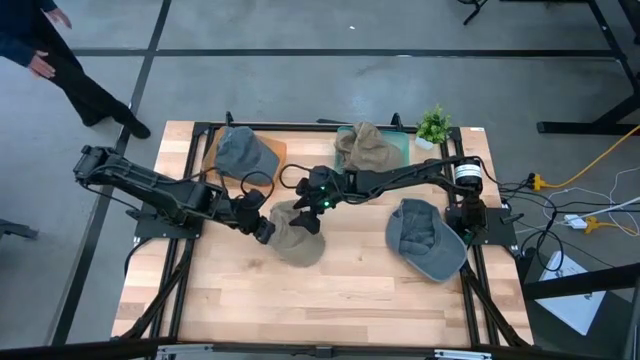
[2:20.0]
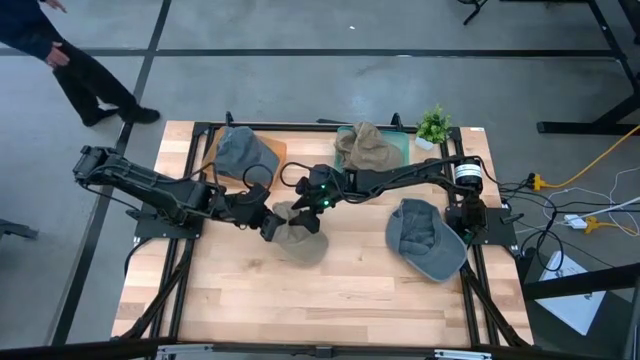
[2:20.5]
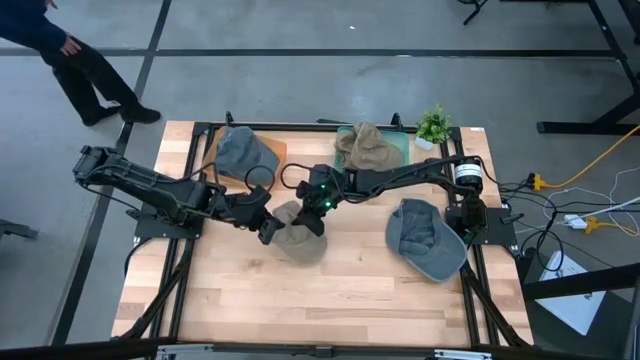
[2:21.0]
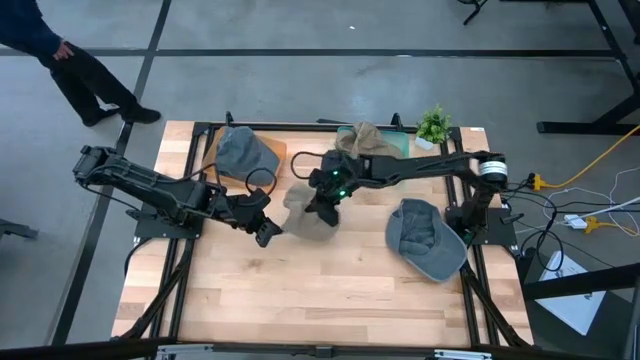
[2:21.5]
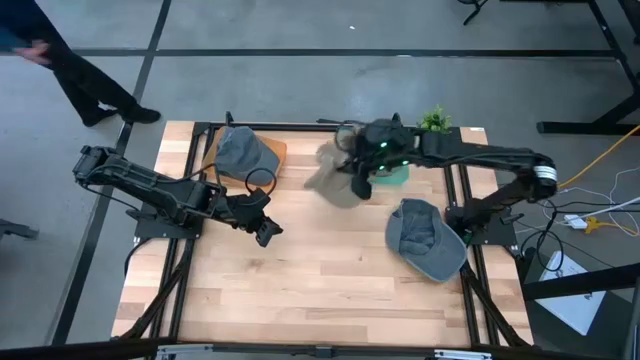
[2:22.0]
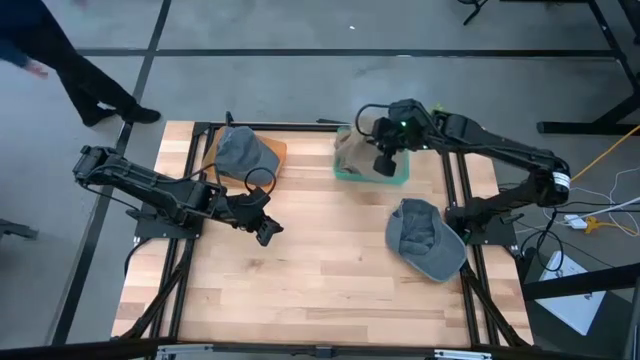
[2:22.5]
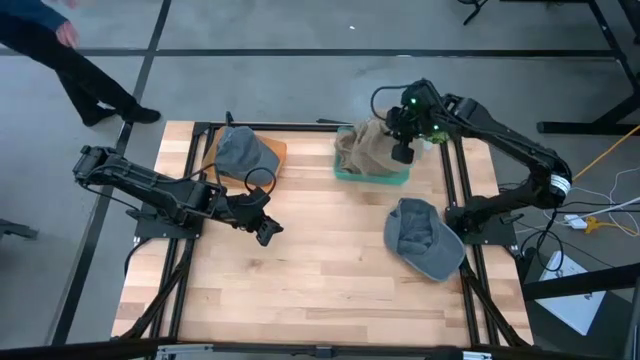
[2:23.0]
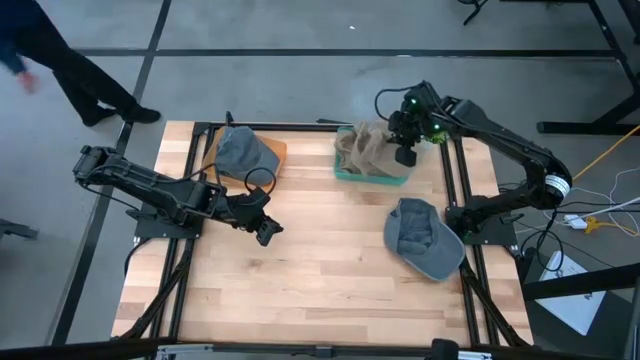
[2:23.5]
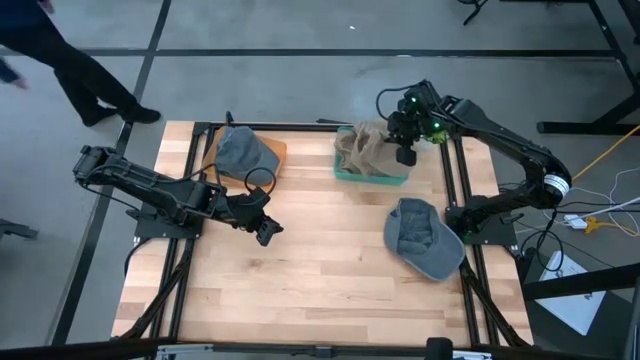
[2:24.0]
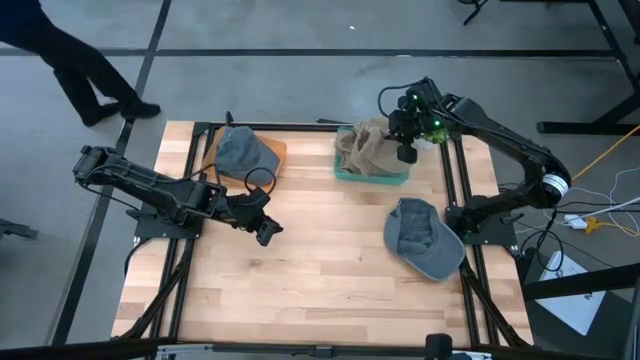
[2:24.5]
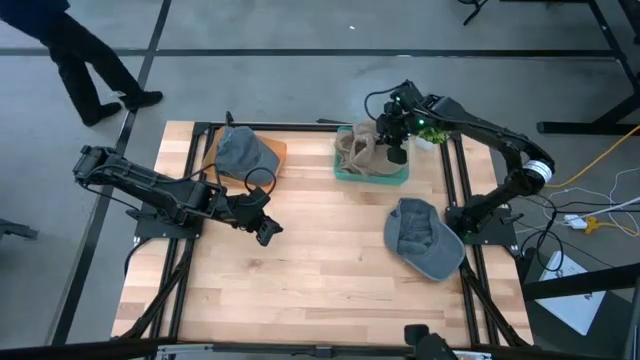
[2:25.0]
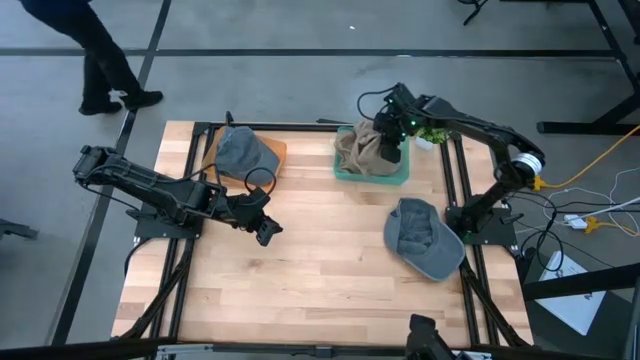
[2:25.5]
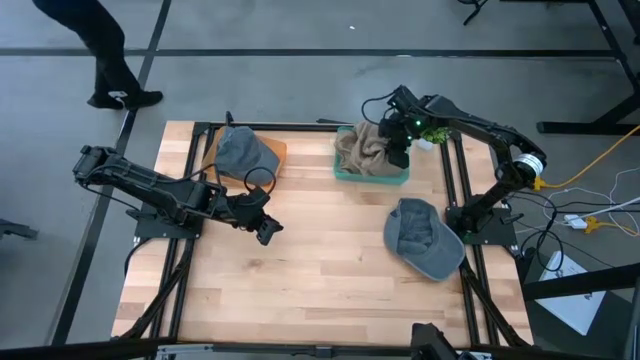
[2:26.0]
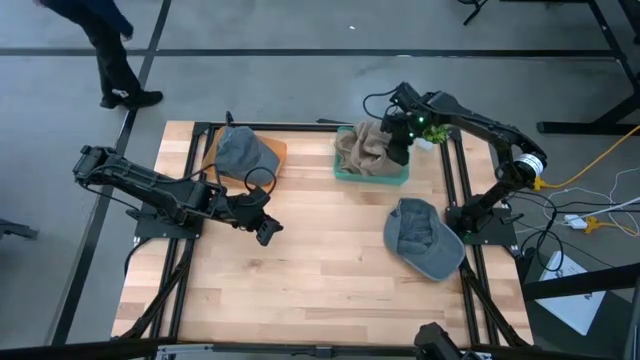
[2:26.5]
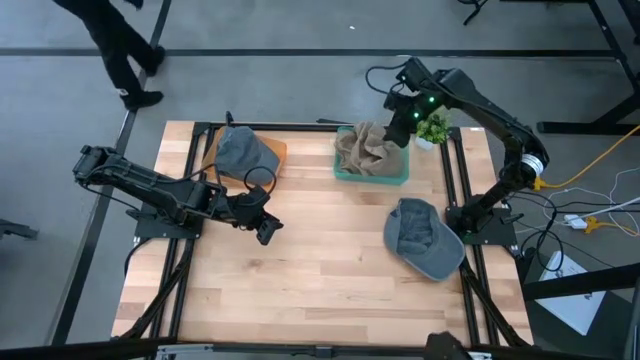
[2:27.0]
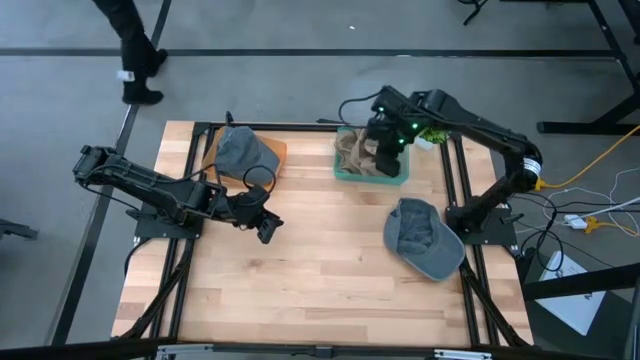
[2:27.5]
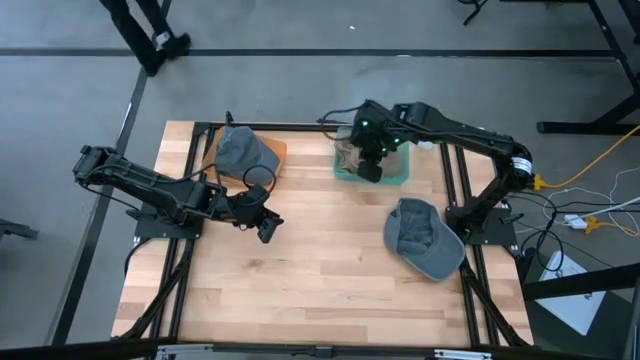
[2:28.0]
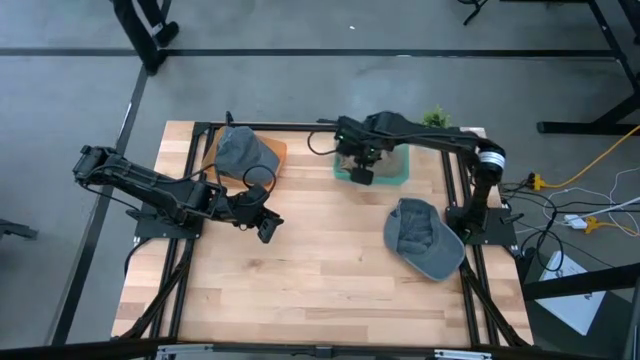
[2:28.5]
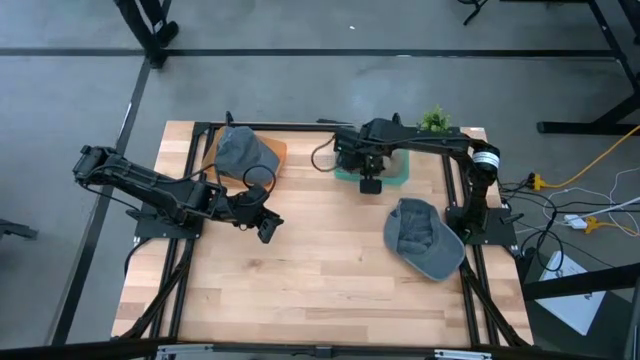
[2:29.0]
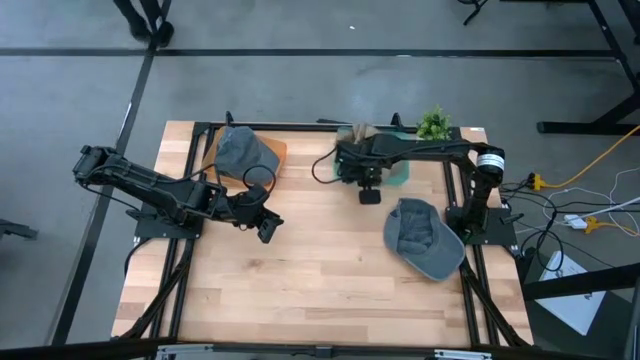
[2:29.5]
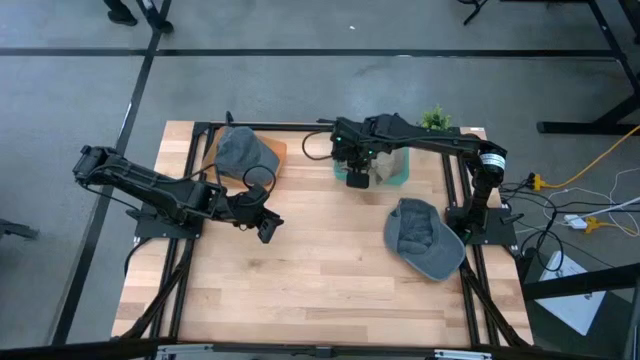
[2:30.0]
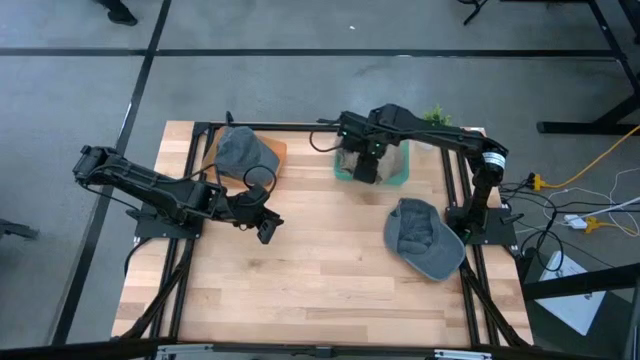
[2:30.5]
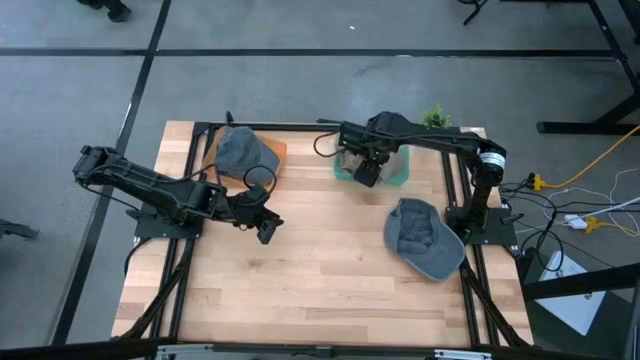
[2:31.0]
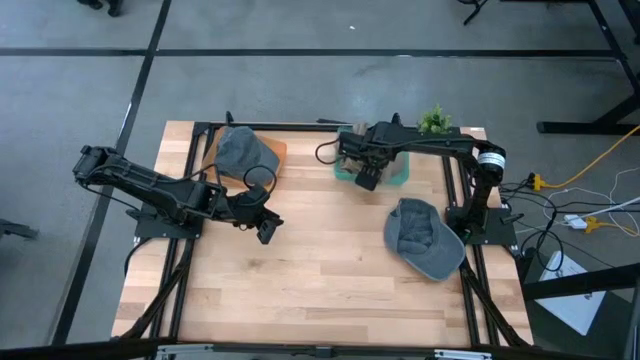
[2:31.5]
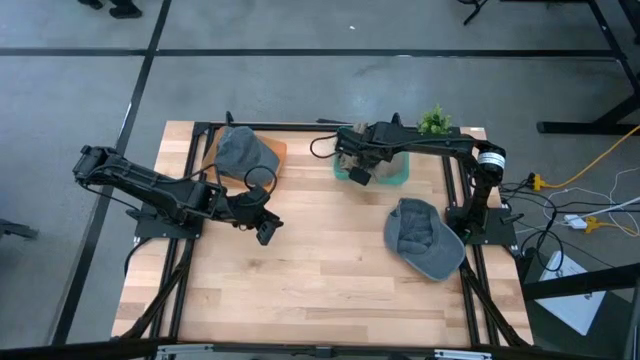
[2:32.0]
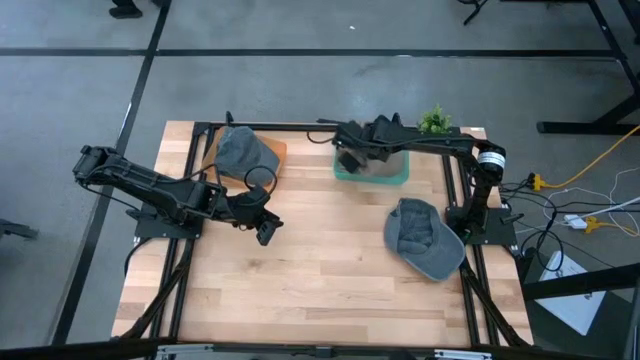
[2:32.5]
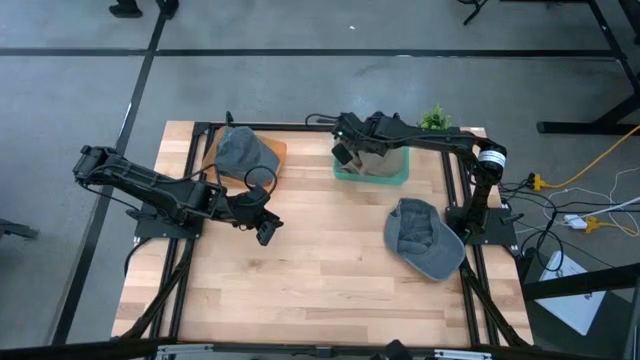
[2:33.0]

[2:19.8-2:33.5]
Task: Pick & Place hat
Put the brown cap into the green bin

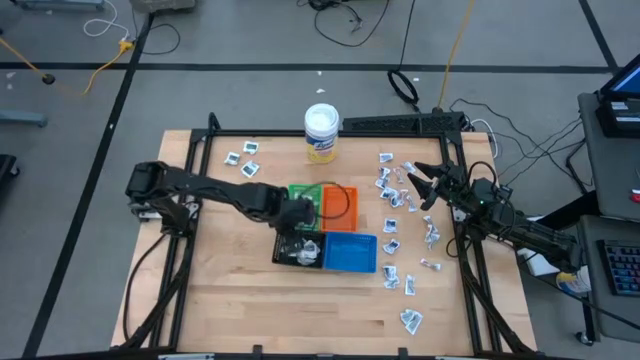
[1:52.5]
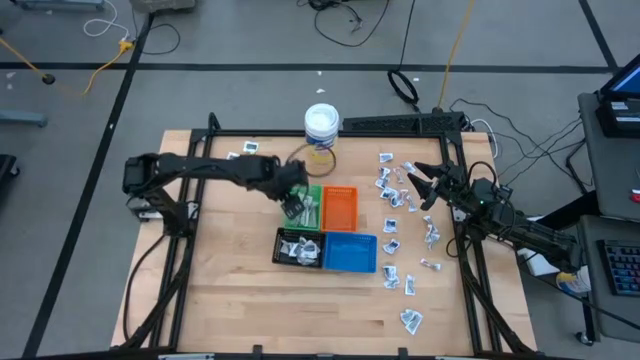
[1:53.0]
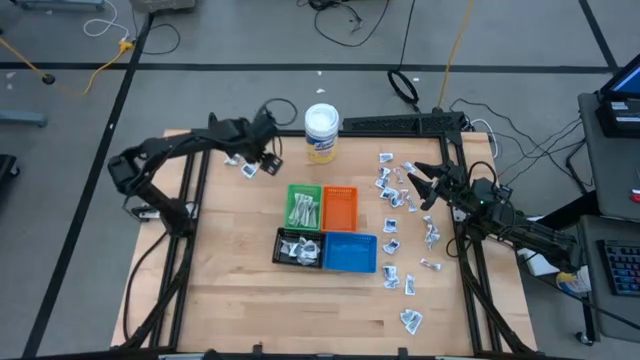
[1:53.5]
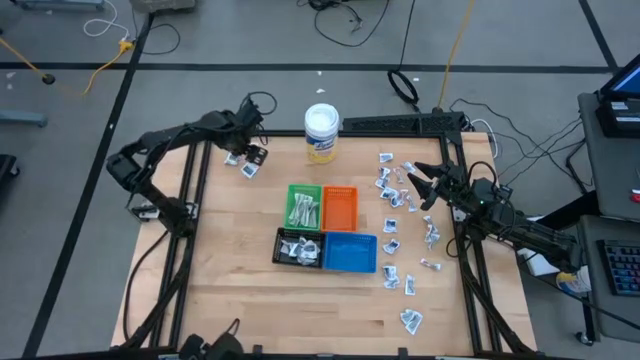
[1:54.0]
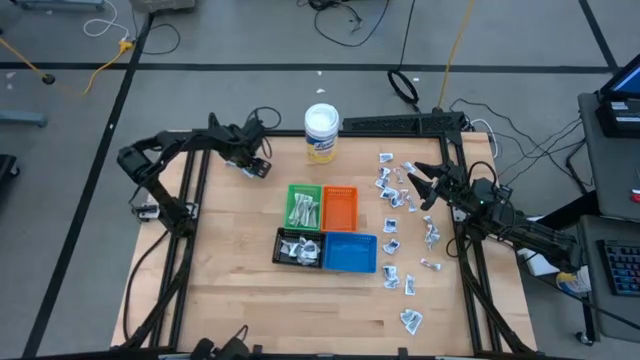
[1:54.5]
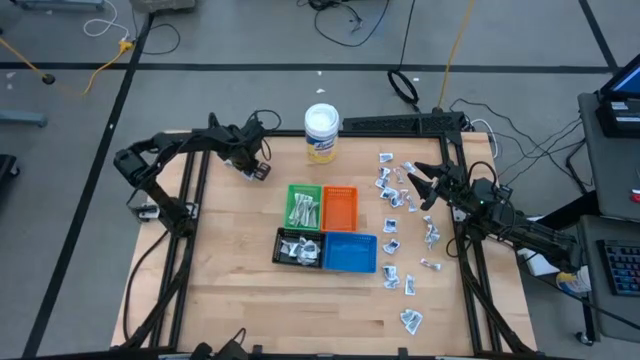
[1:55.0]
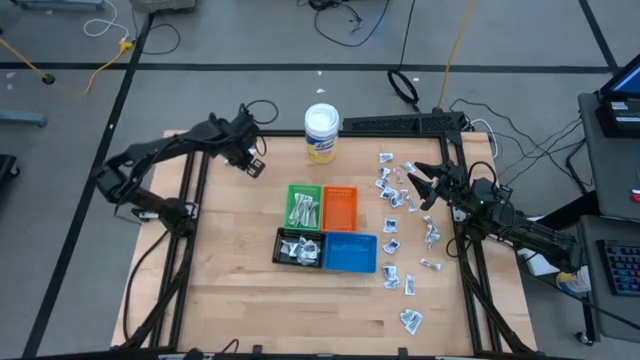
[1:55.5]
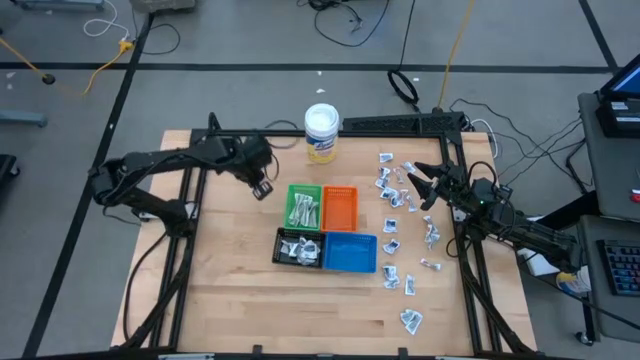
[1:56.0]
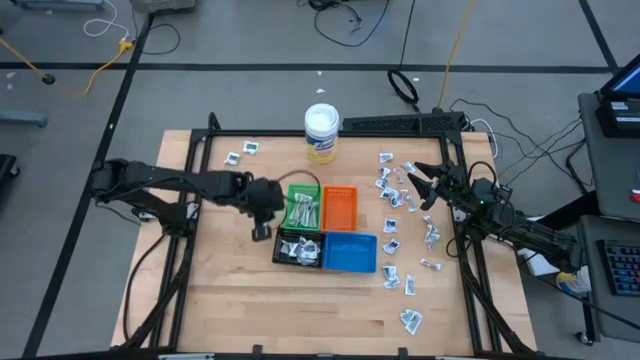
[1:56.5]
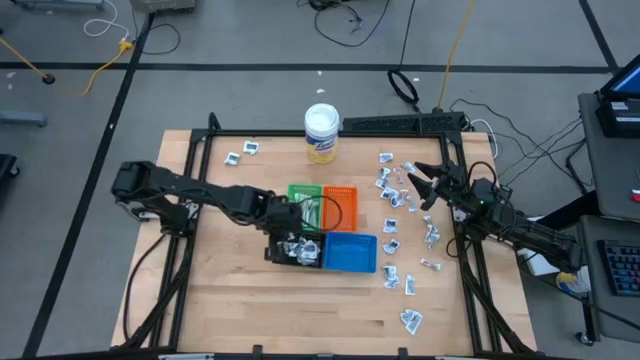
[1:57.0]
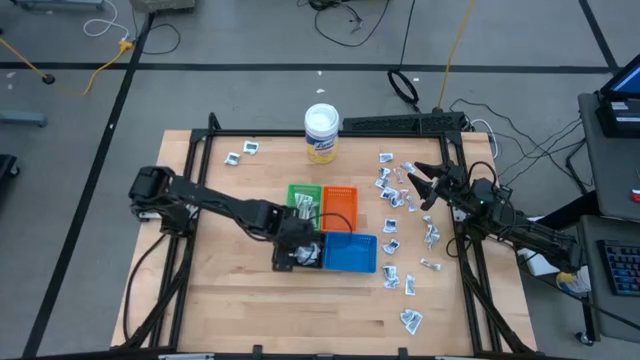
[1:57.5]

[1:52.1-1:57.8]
Task: Pick & Place First Aid Supplies
Put the towelette pack into the black bin
